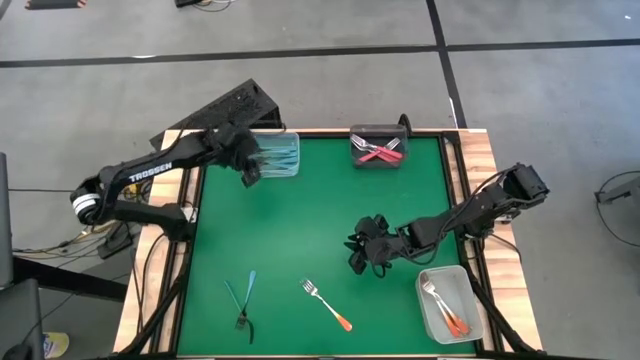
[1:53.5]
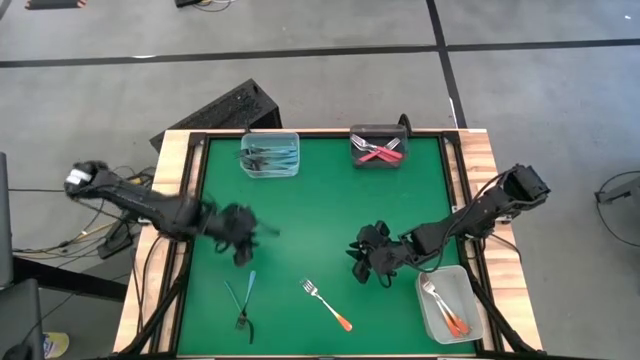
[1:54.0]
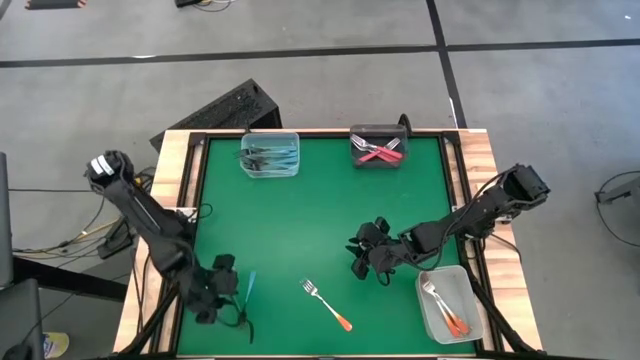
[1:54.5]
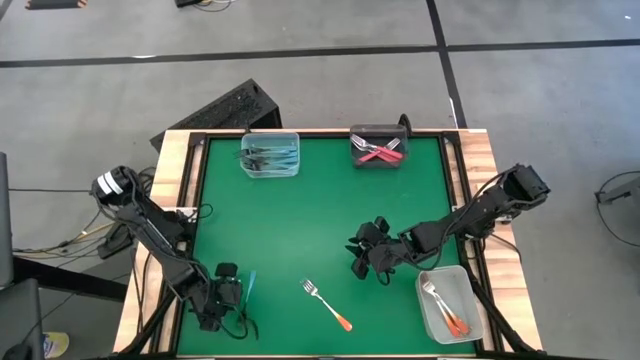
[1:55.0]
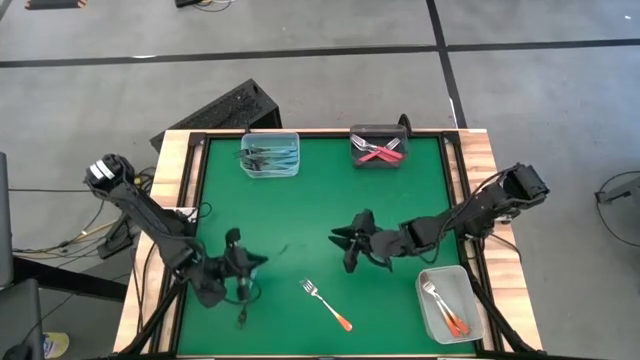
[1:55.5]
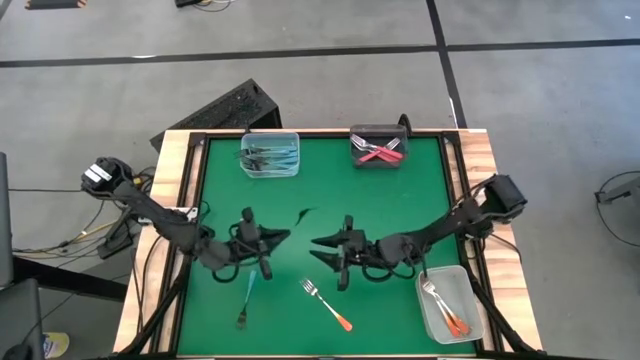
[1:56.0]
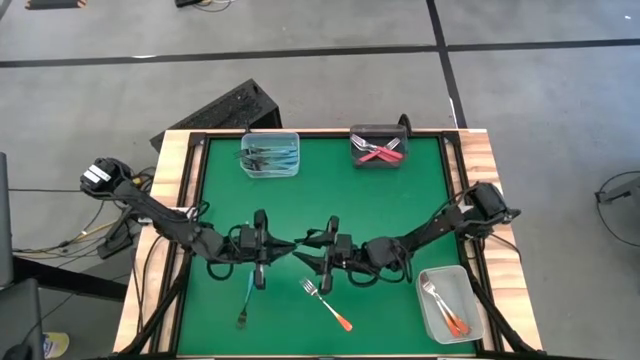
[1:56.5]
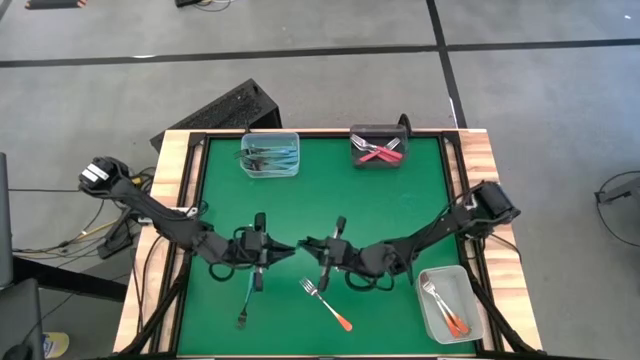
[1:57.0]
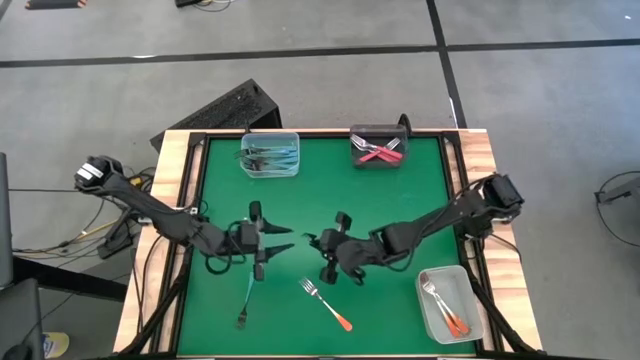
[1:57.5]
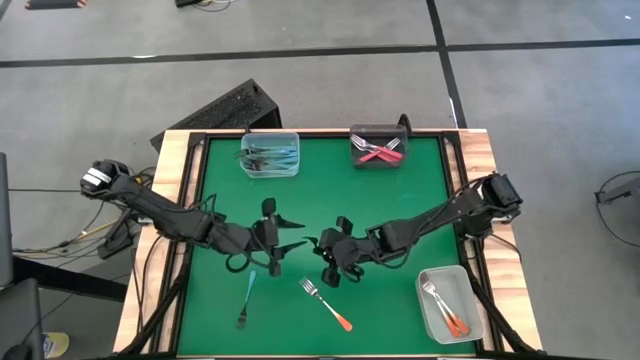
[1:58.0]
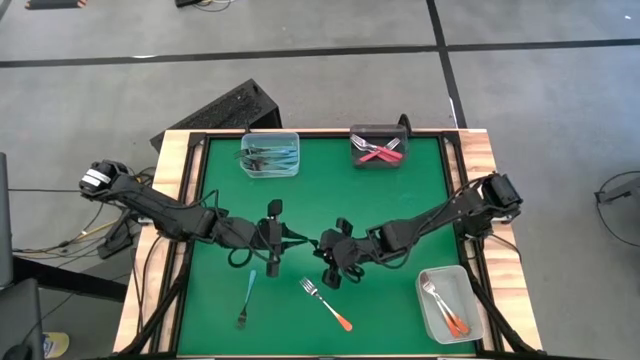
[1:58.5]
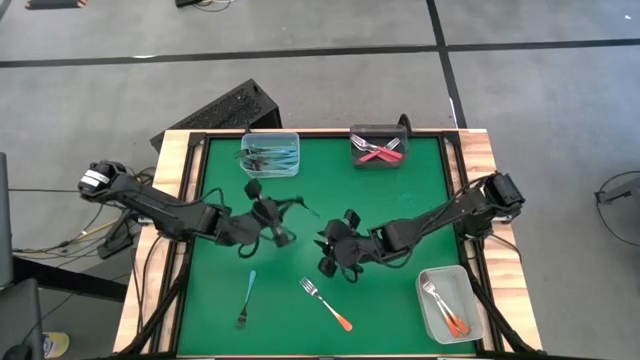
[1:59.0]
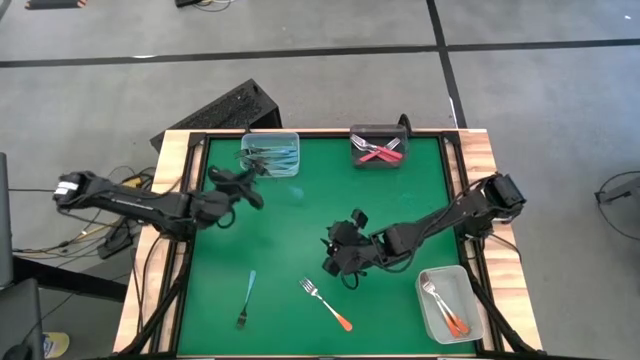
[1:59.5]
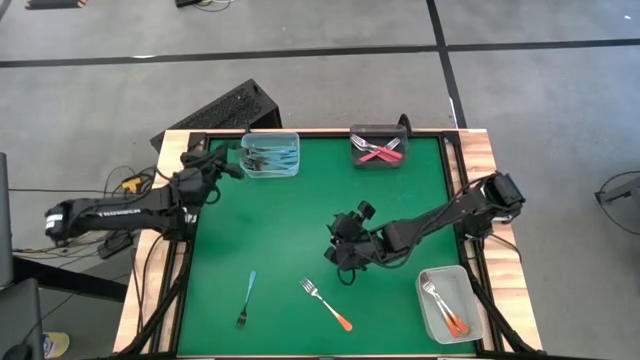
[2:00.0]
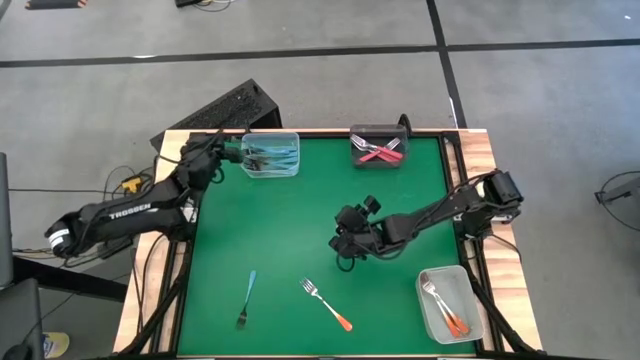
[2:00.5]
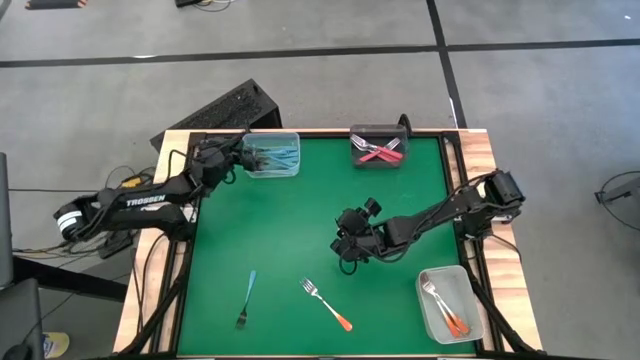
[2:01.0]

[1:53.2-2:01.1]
Task: Sort silverware by color (type)
Put the black fork into the transparent bin

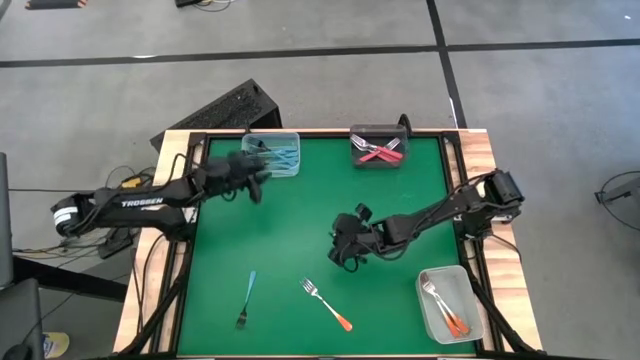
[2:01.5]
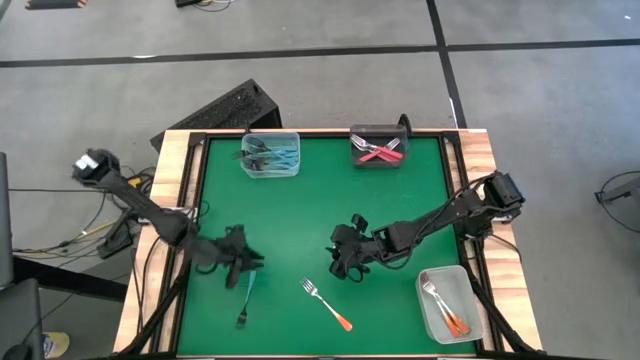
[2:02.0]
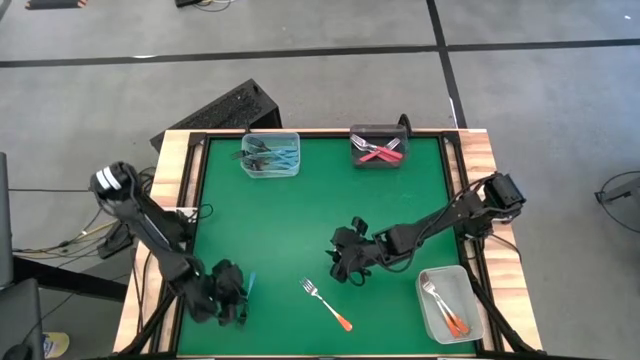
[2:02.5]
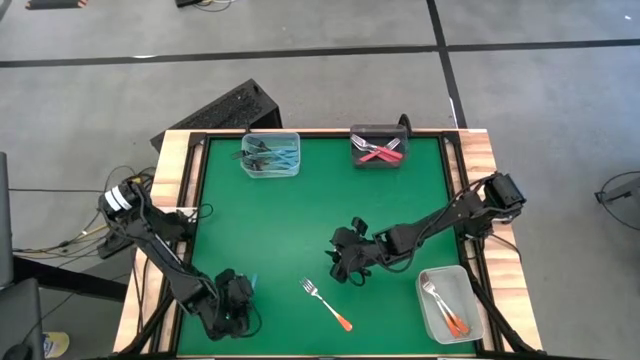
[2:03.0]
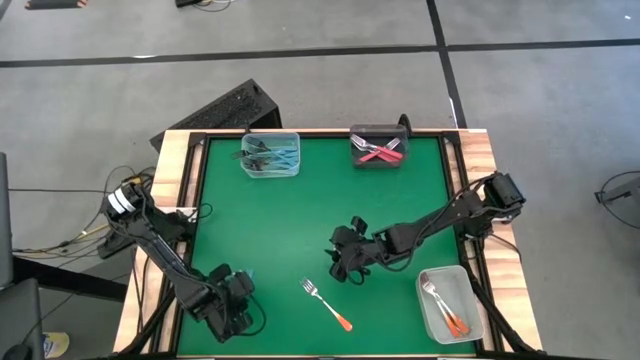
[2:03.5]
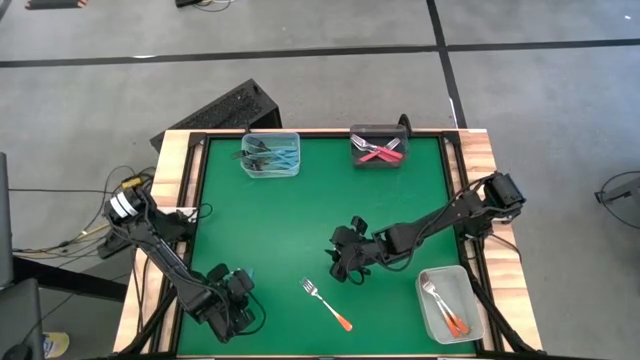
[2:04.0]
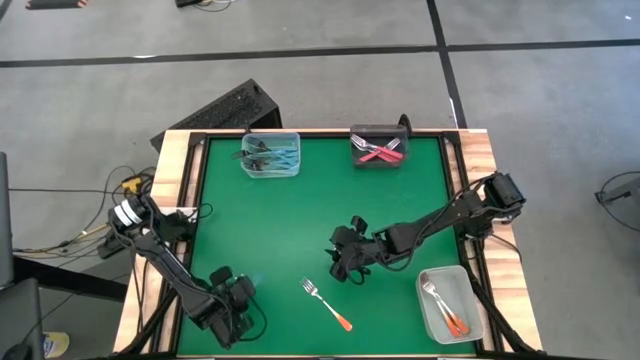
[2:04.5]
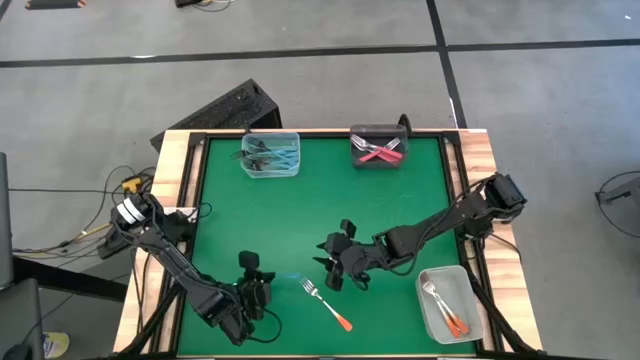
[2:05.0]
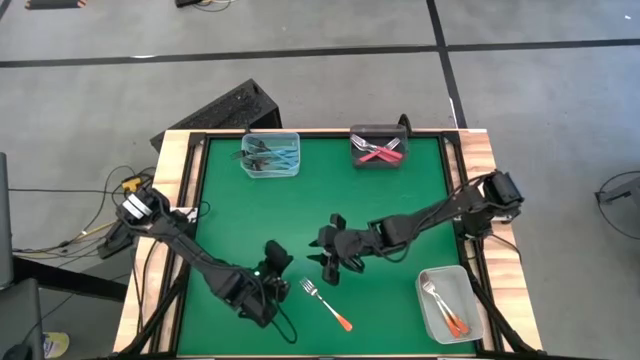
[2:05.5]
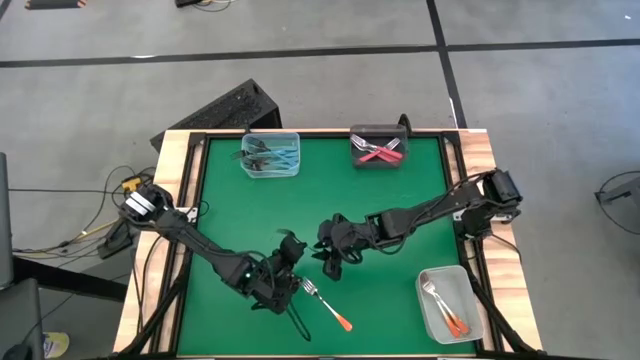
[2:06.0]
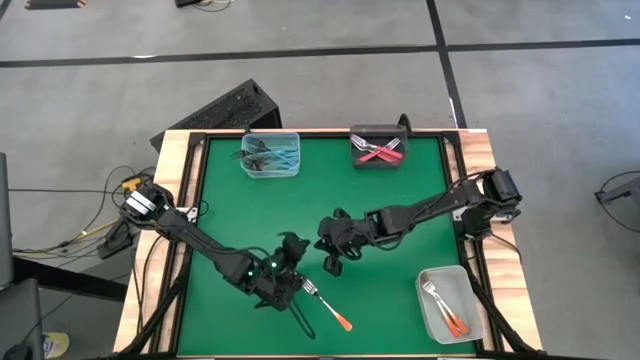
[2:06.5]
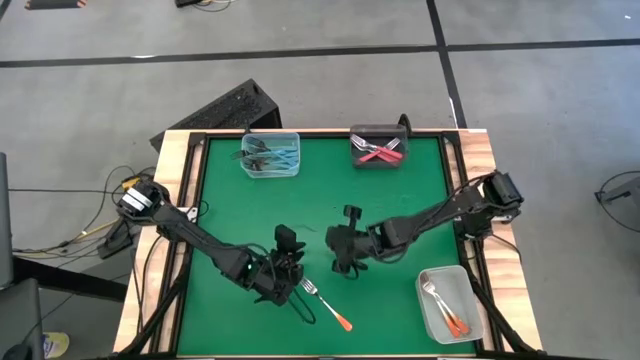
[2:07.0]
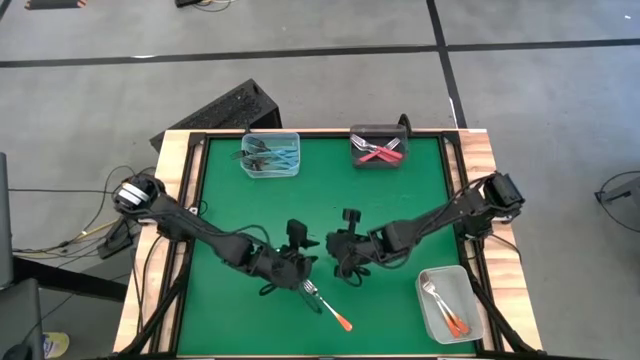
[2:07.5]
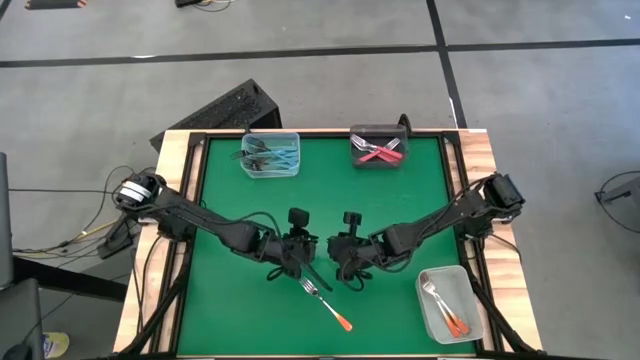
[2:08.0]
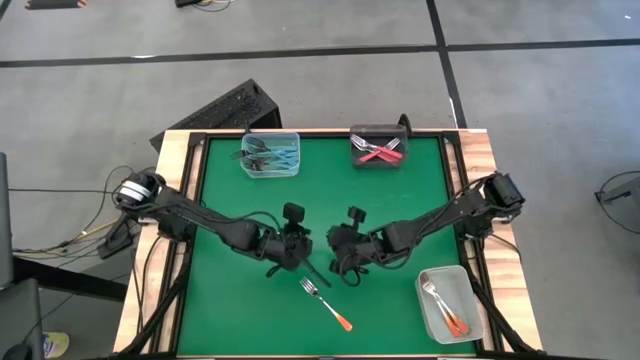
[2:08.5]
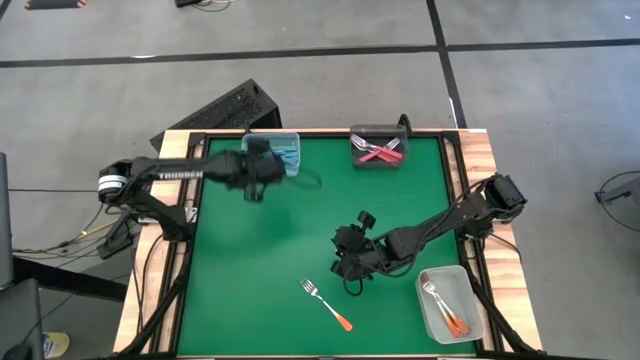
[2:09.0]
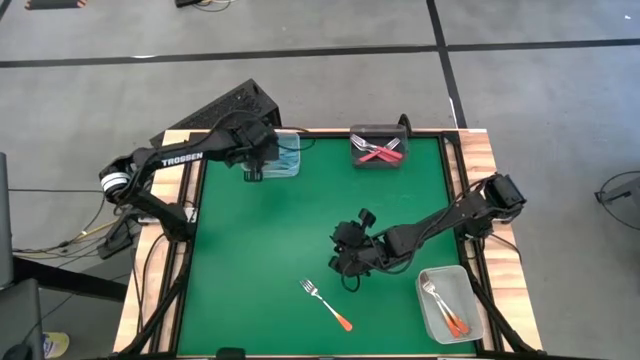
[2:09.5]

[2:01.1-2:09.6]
Put the black fork into the transparent bin

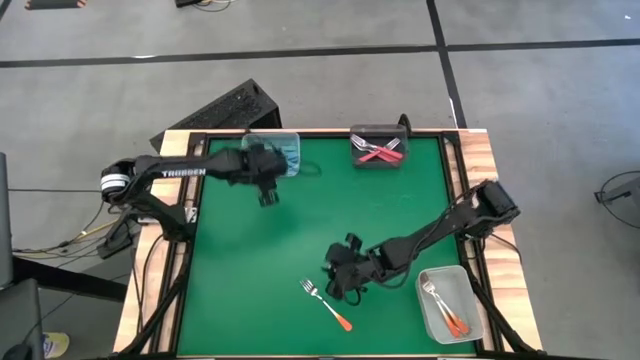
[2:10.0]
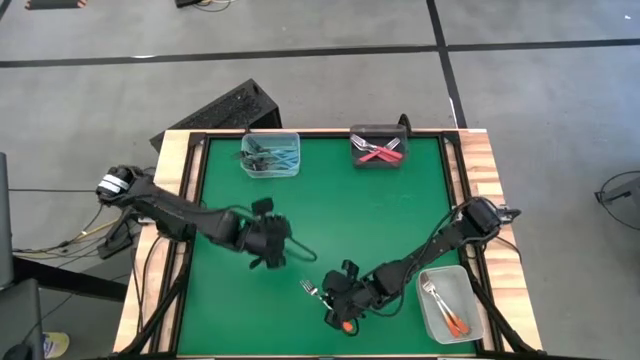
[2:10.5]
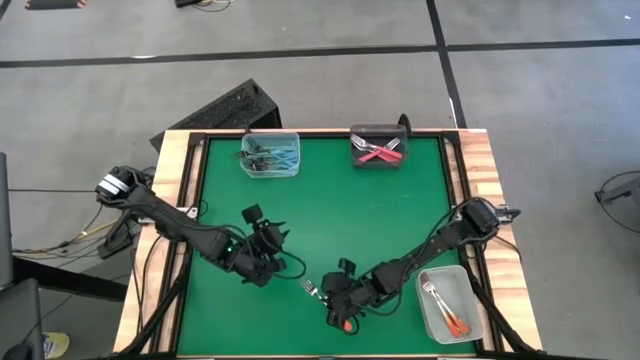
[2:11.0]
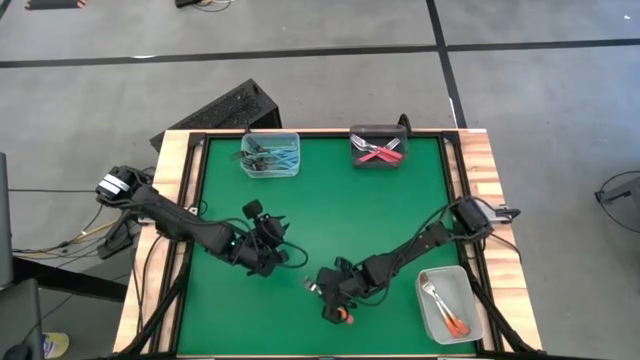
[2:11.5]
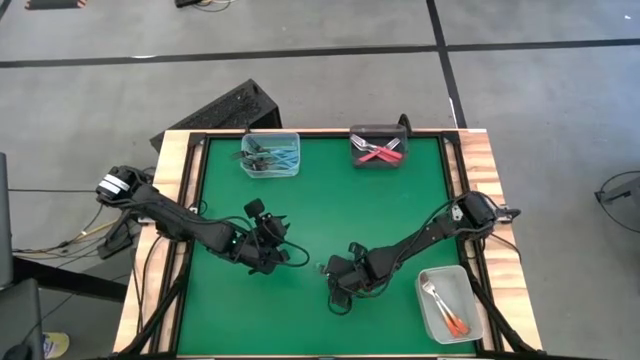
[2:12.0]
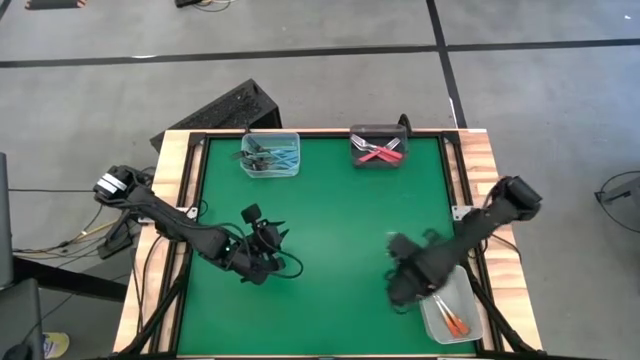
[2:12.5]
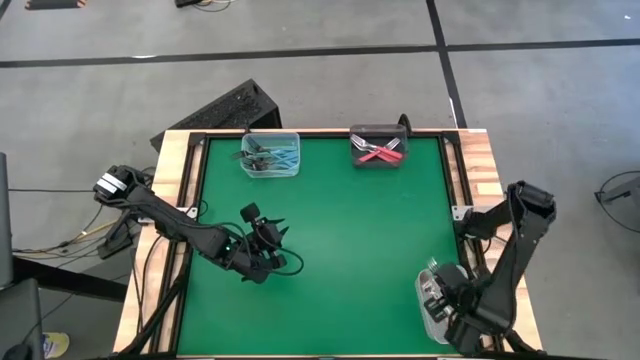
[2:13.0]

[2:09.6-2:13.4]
Put the orange fork into the white bin

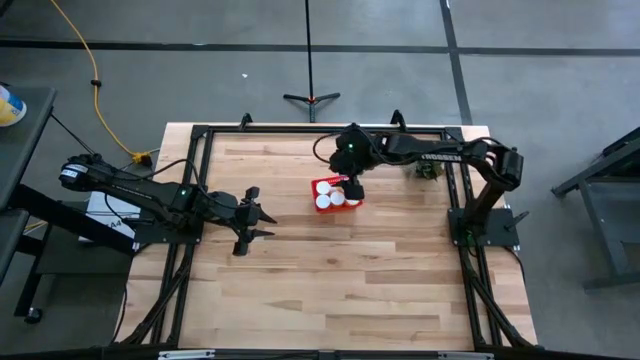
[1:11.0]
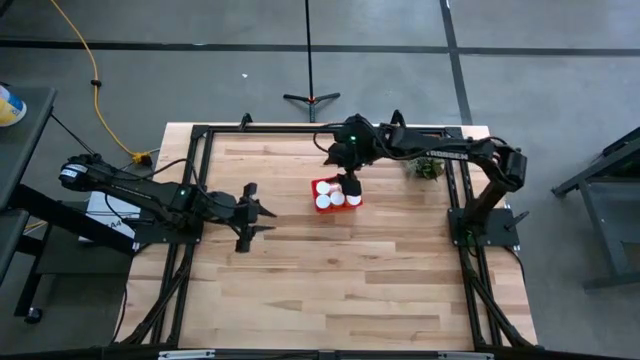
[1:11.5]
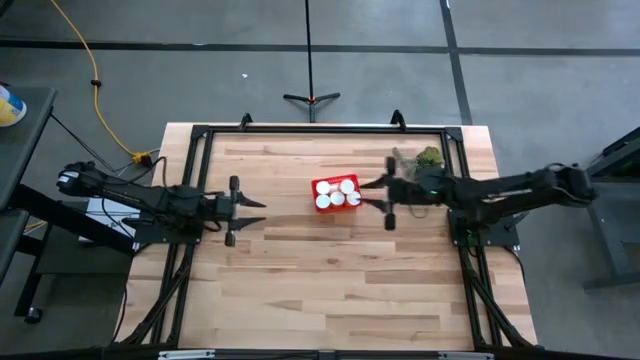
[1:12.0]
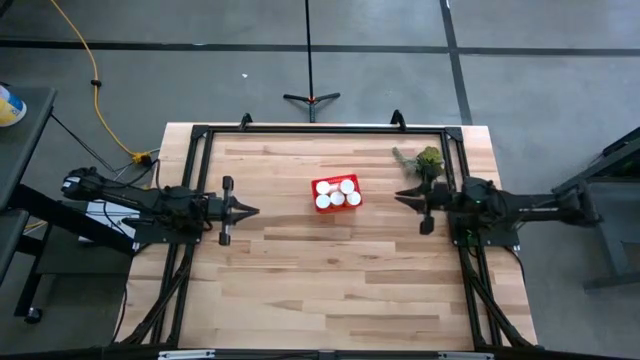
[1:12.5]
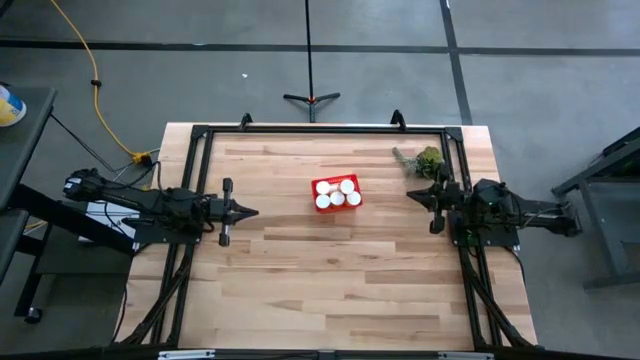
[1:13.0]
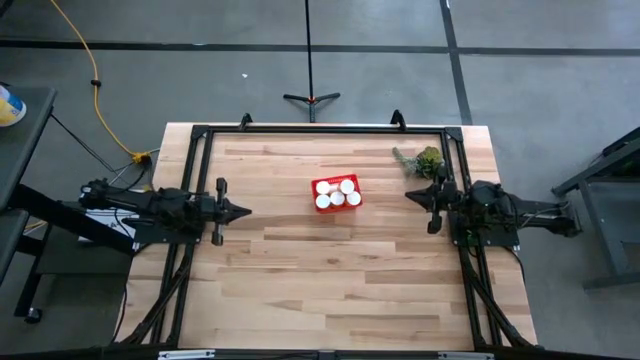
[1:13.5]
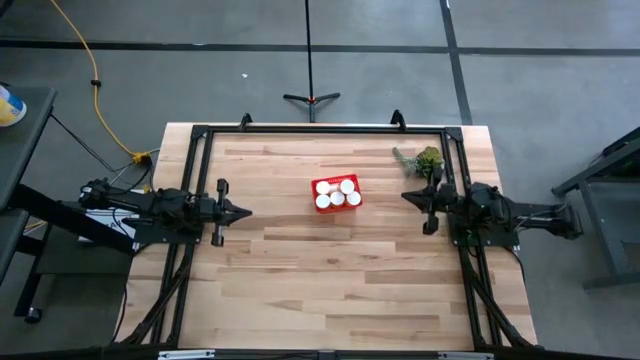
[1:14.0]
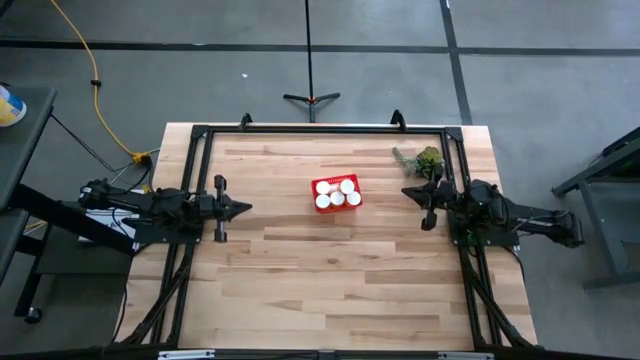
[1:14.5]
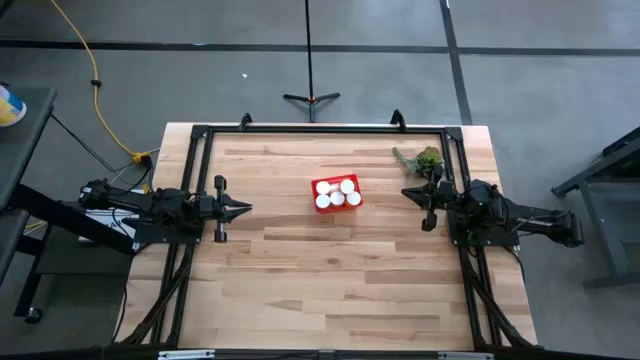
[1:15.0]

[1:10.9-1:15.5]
Task: Pick and place pill bottles into a basket
Return to Home Position
